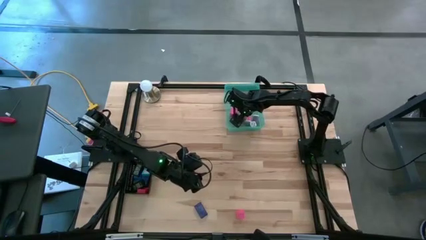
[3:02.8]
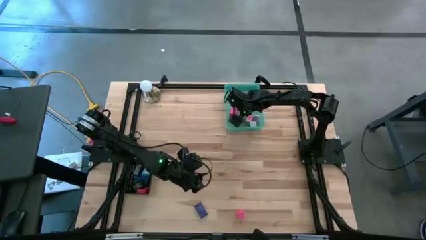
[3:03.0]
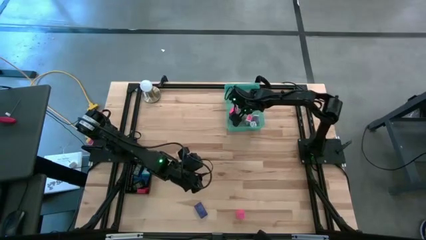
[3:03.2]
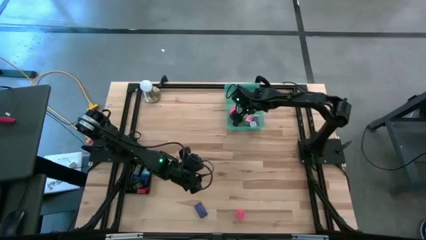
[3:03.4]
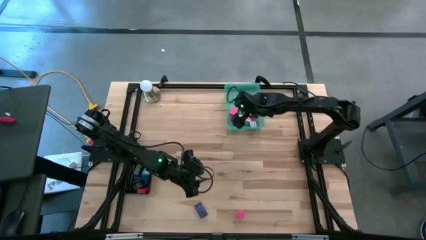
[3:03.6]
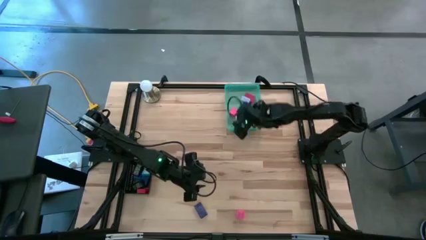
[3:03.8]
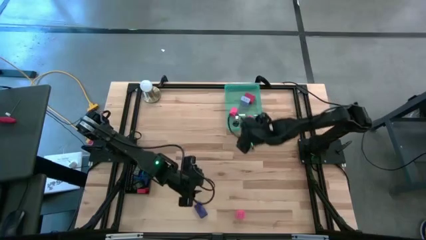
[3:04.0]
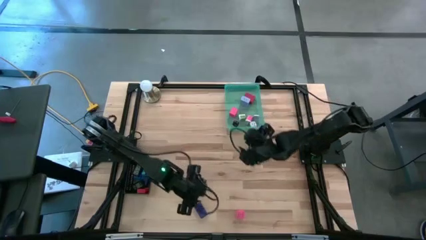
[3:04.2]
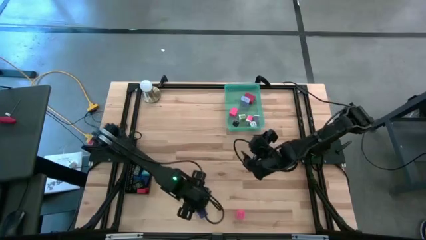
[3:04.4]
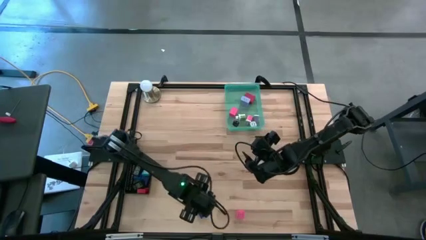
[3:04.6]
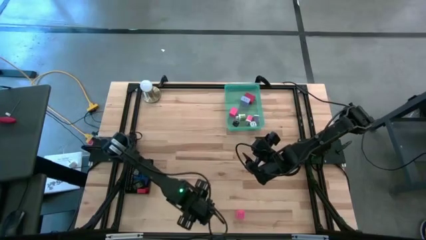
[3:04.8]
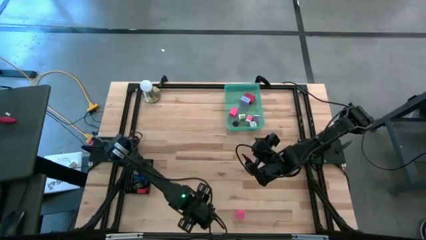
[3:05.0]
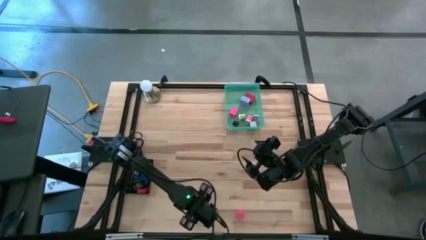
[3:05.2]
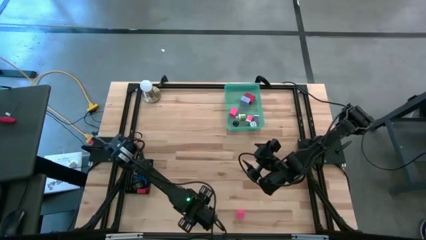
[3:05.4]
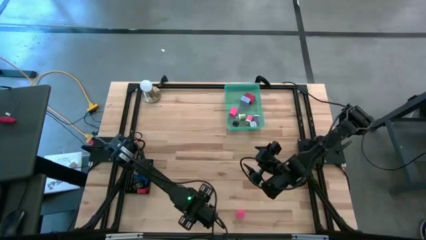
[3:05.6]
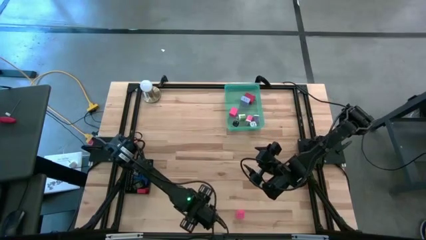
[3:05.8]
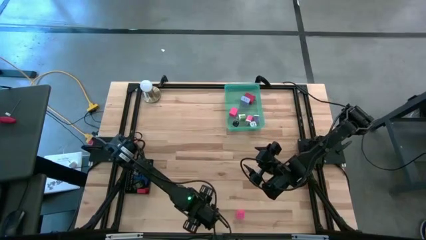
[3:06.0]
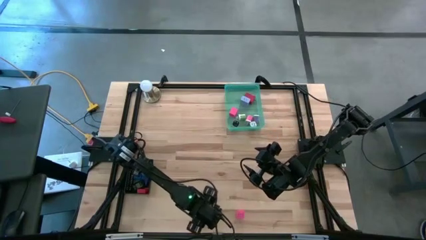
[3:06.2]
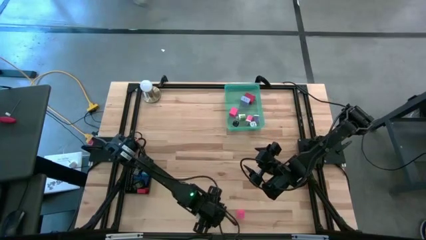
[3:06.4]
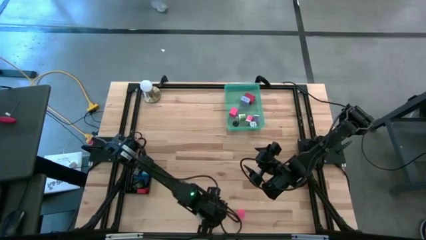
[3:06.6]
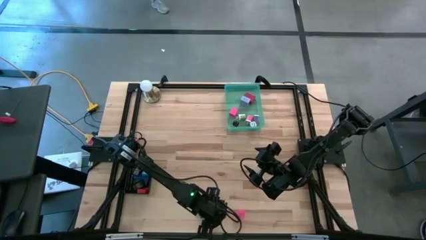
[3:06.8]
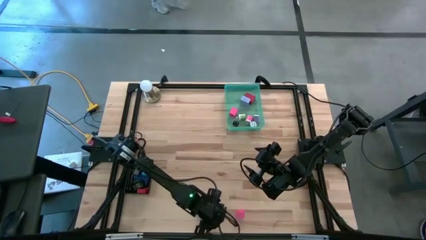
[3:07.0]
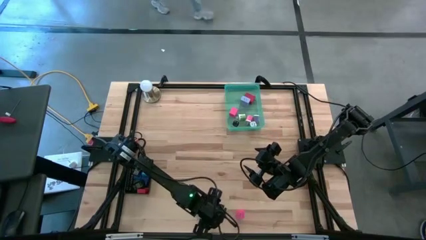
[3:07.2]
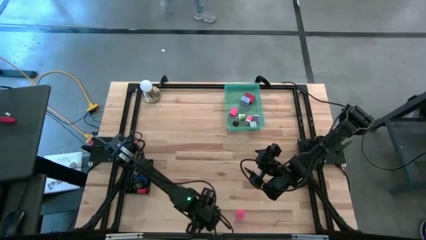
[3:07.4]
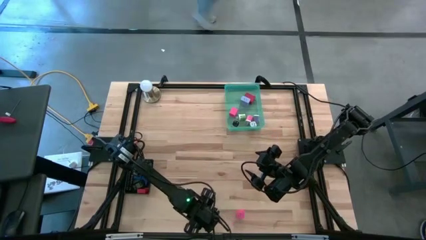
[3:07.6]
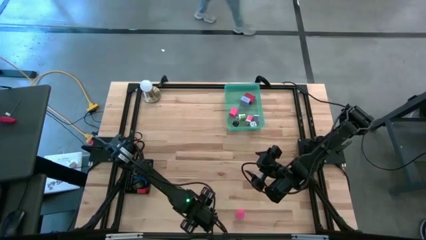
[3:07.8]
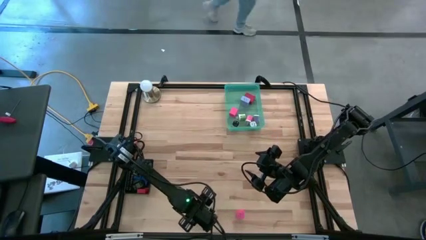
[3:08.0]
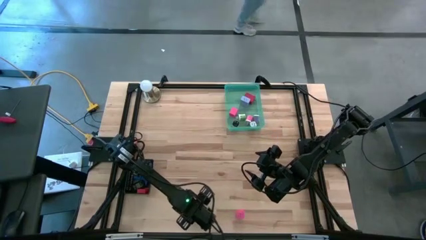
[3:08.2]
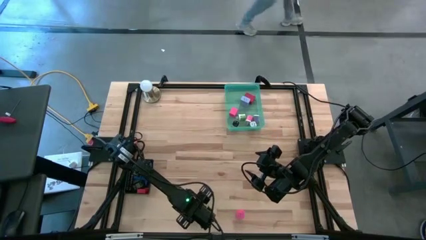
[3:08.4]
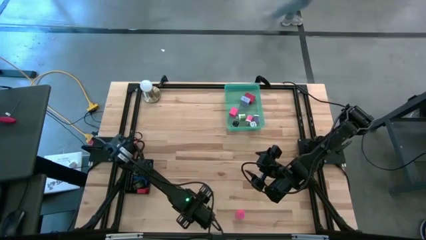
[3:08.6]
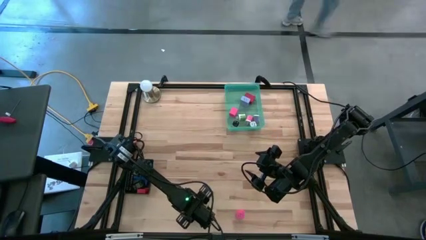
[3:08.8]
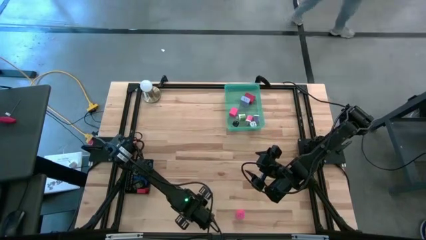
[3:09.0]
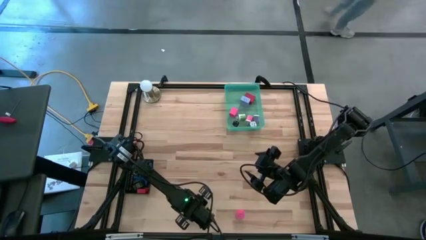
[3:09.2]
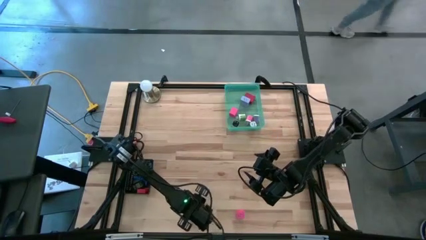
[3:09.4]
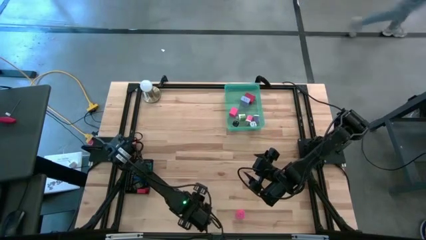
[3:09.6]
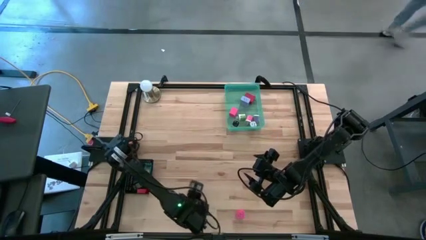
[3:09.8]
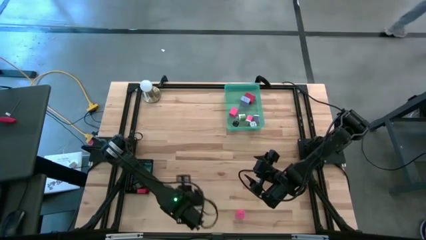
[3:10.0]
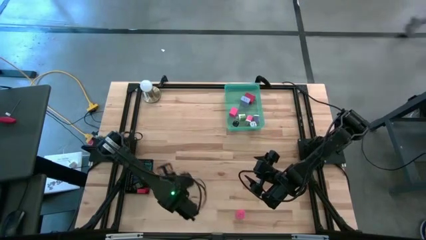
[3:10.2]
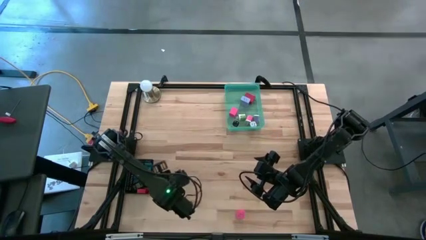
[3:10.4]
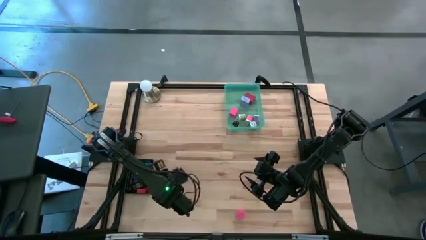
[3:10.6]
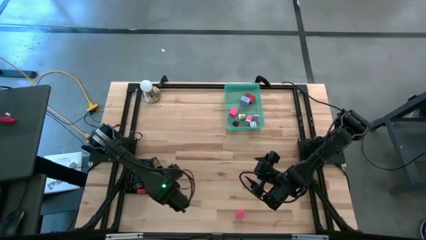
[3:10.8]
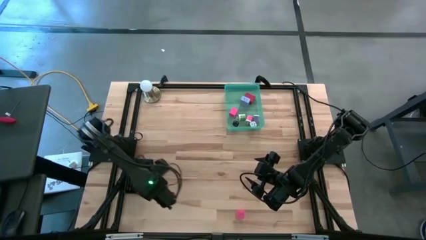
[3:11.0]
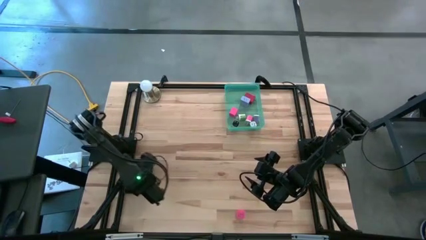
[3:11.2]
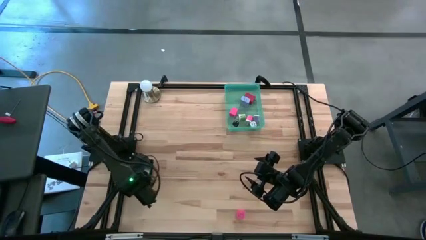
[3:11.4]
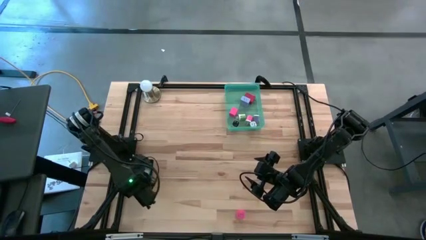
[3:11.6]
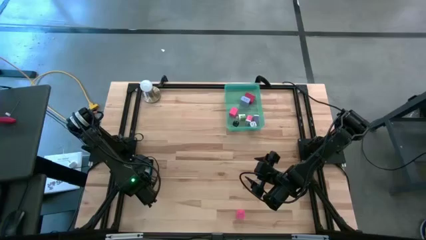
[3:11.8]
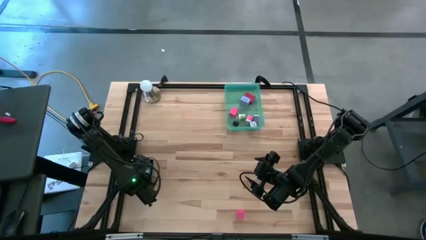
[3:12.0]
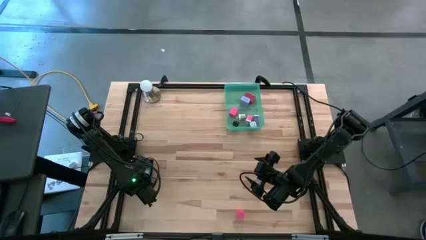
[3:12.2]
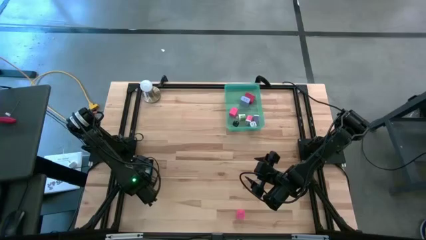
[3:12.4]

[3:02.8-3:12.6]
Task: Pick & Place Office items
Put the blue digital timer into the black bin
